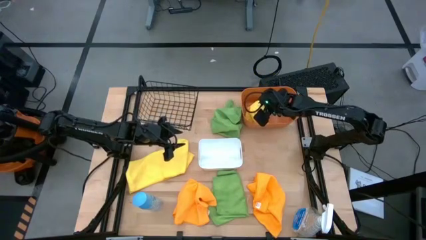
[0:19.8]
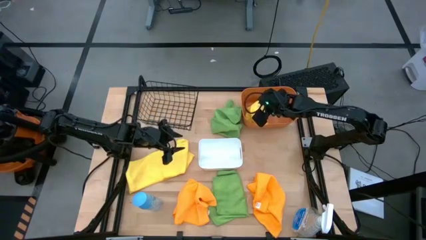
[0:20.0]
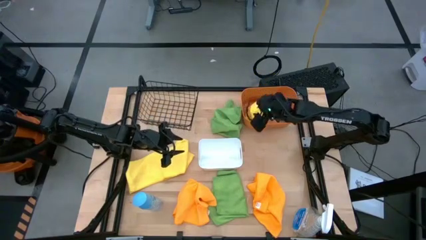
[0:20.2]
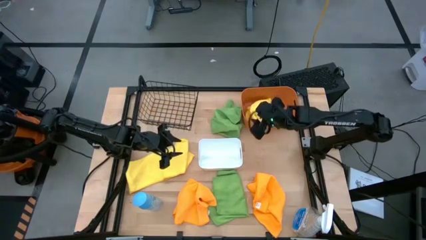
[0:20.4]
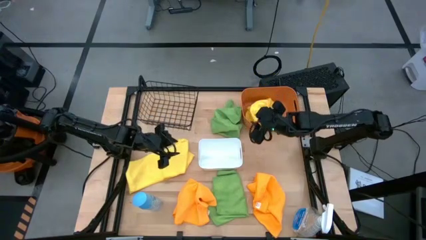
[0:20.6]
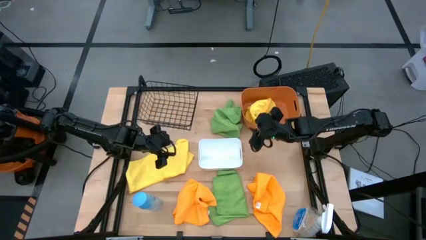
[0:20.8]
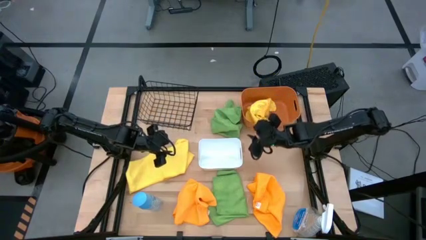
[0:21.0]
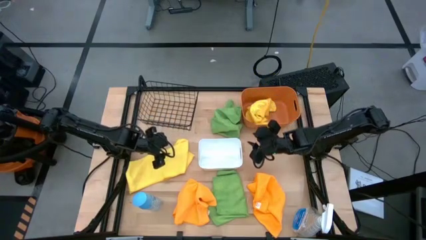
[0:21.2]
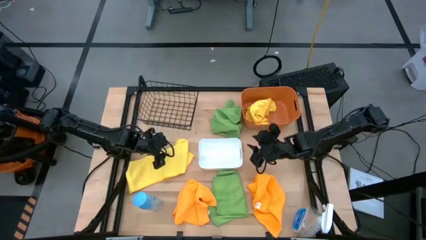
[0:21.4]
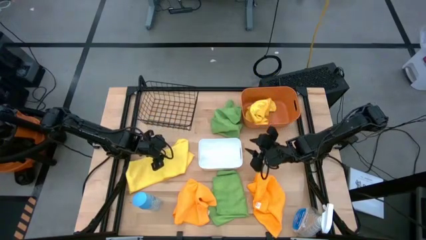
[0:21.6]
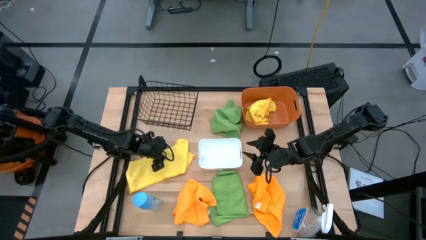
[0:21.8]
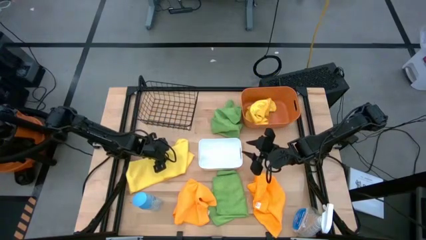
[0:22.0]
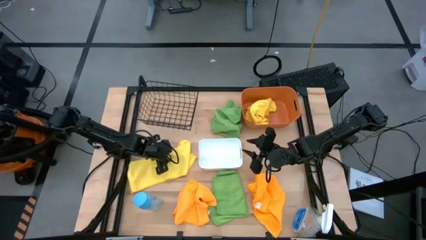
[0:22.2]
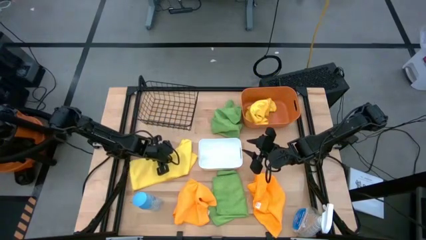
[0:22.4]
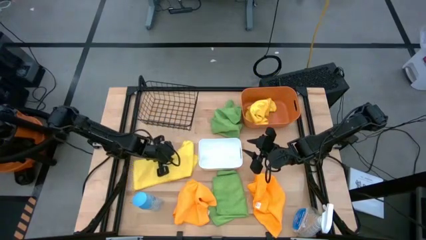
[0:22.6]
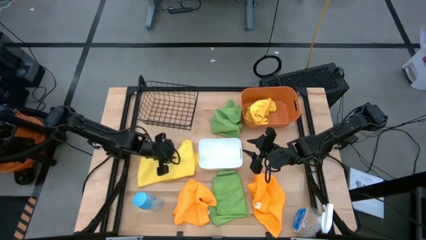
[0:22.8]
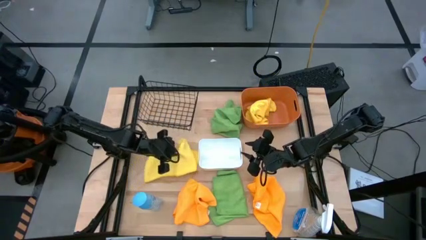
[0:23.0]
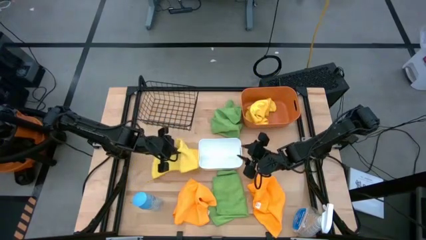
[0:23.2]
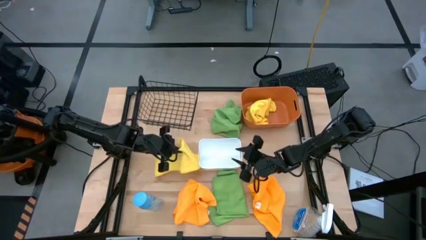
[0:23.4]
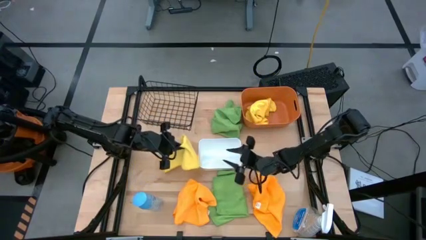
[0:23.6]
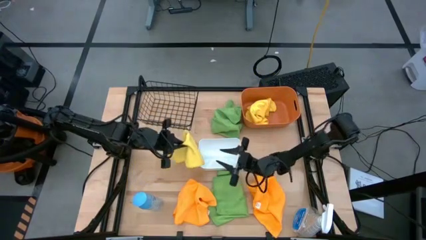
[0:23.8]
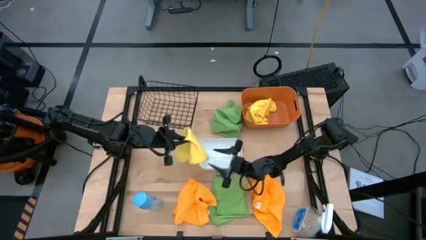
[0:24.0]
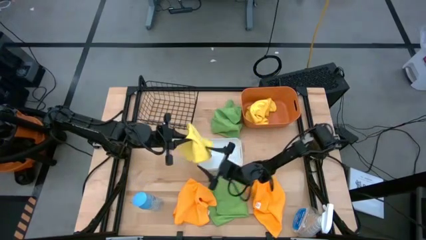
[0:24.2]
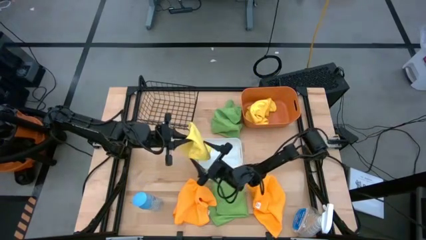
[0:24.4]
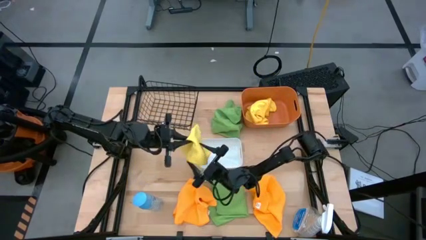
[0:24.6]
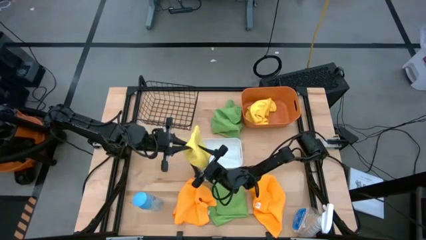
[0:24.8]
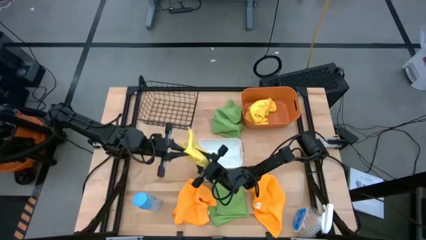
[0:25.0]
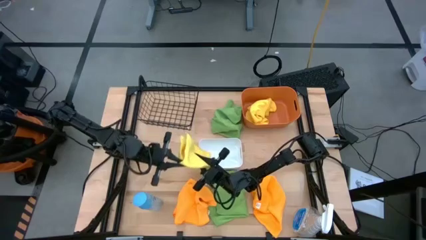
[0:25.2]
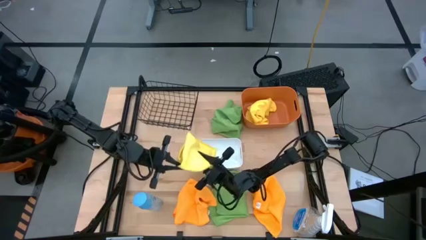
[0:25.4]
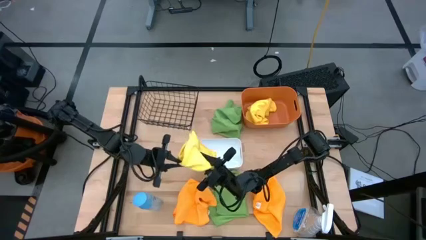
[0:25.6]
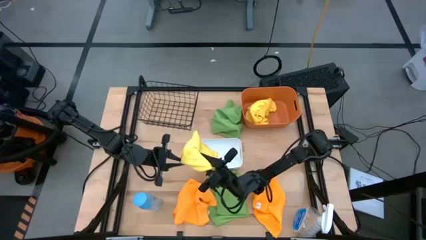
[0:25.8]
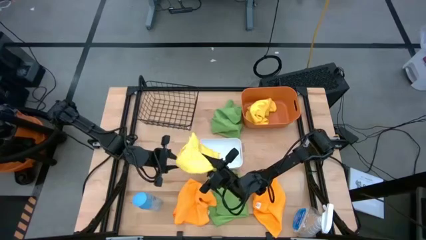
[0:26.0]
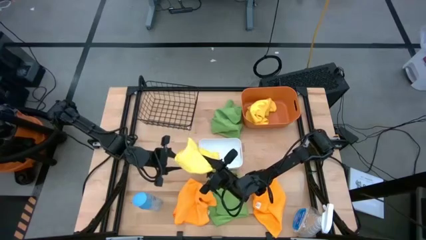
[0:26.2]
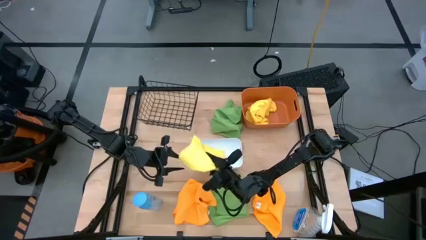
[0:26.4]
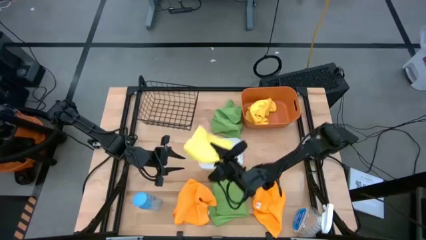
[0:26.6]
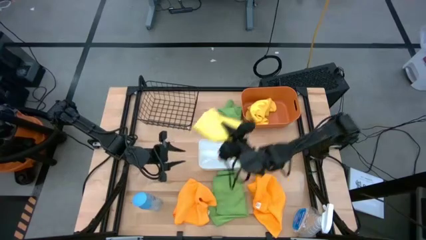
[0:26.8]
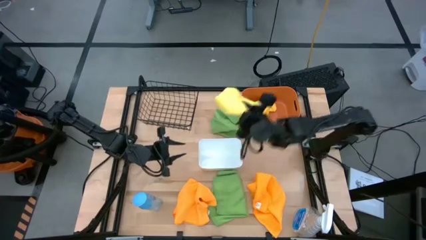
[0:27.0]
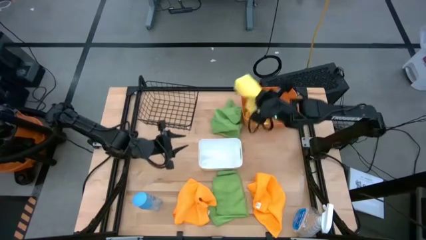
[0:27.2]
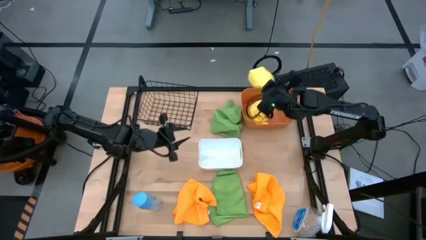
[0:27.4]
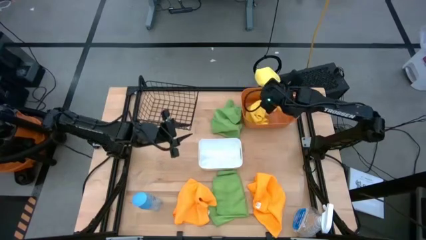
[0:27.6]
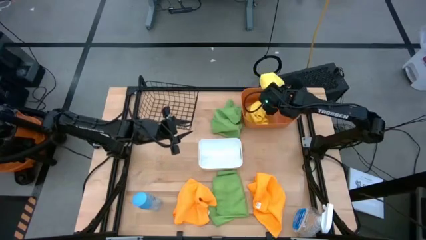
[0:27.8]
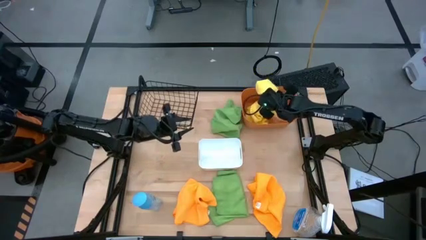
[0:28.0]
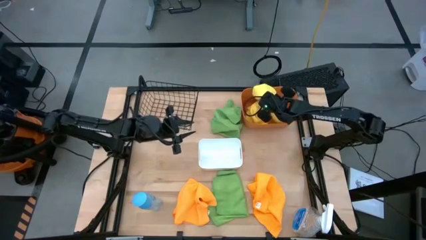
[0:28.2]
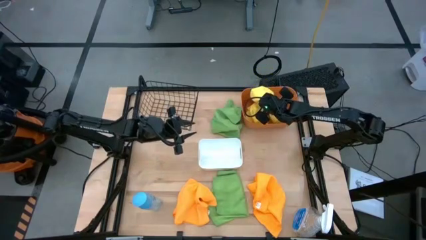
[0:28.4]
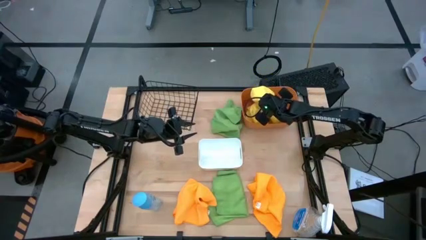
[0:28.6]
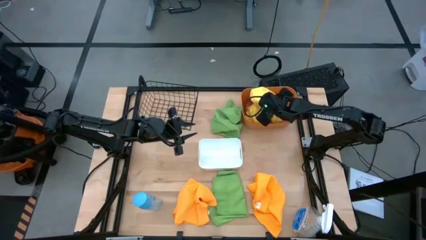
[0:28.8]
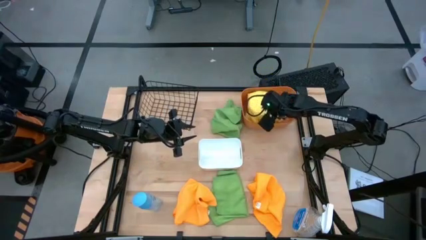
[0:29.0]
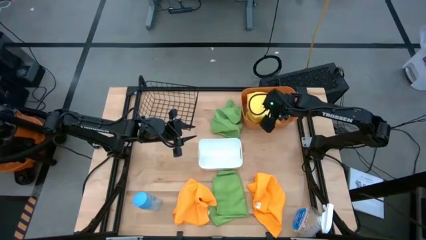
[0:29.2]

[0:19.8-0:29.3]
Task: Sort microfiber towel by color & place in baskets
Put the yellow microfiber cloth into the orange bin
